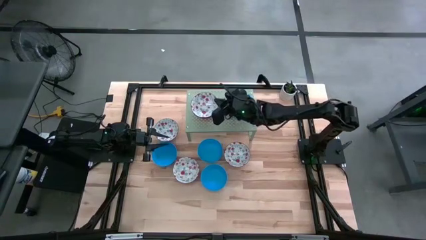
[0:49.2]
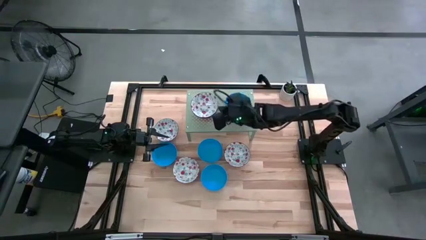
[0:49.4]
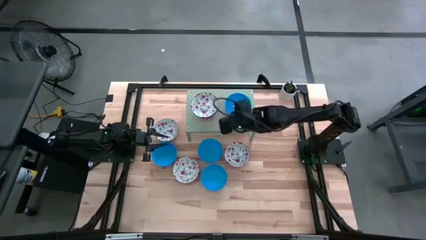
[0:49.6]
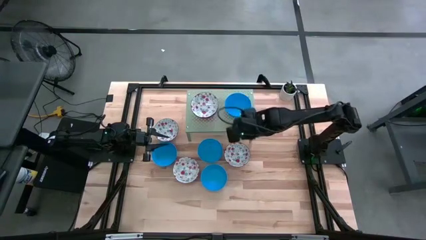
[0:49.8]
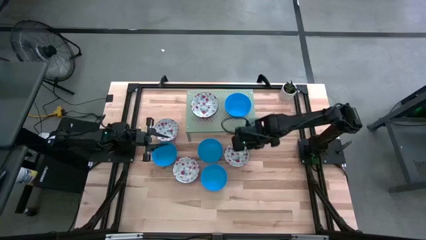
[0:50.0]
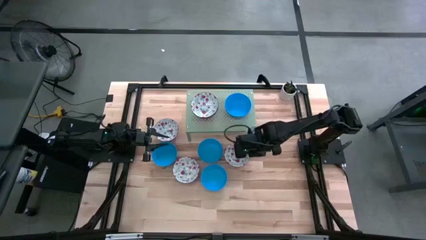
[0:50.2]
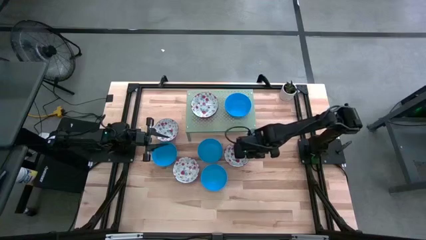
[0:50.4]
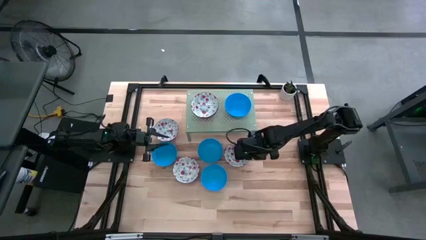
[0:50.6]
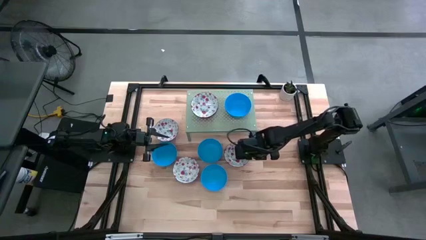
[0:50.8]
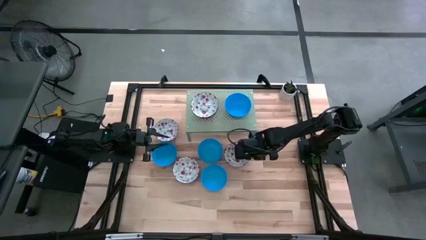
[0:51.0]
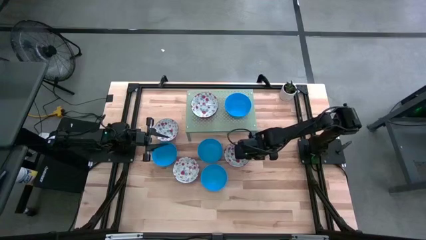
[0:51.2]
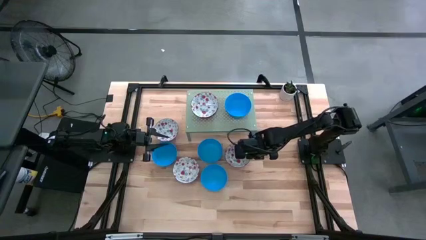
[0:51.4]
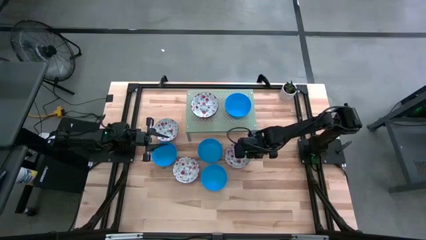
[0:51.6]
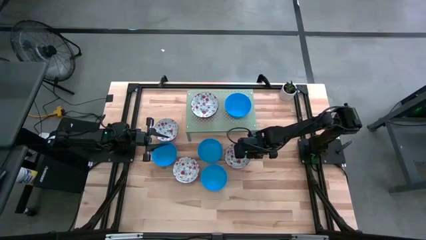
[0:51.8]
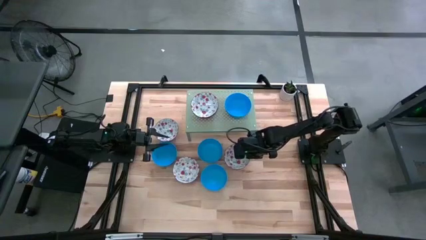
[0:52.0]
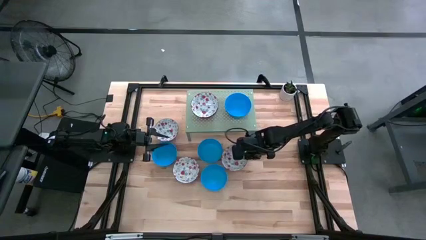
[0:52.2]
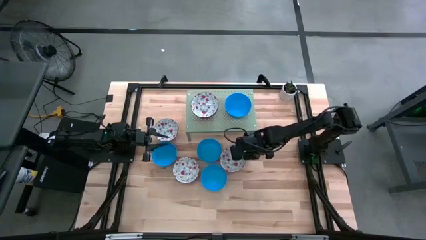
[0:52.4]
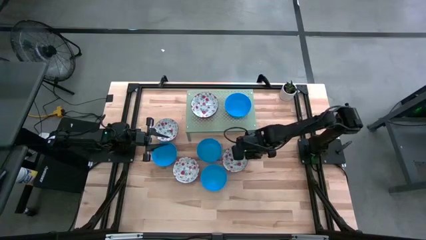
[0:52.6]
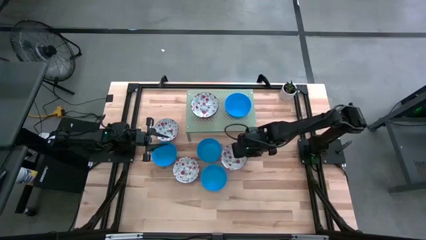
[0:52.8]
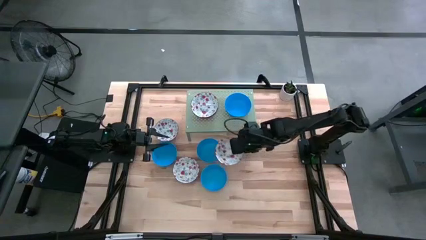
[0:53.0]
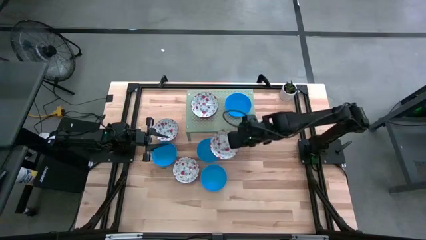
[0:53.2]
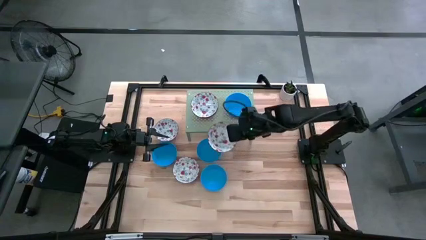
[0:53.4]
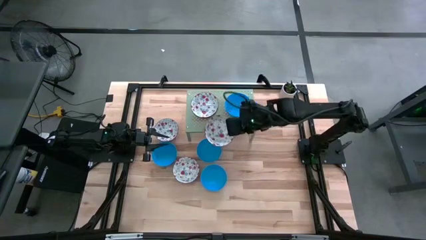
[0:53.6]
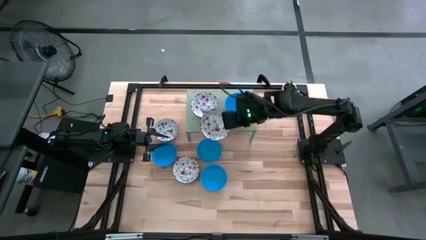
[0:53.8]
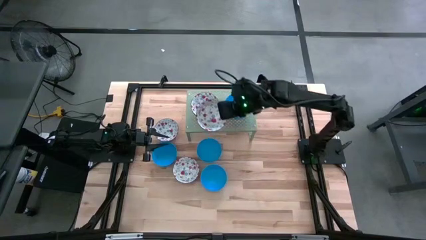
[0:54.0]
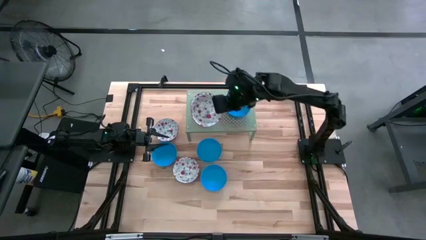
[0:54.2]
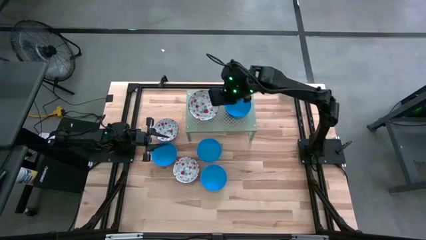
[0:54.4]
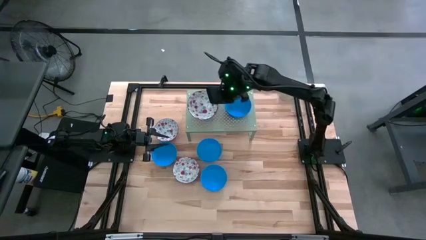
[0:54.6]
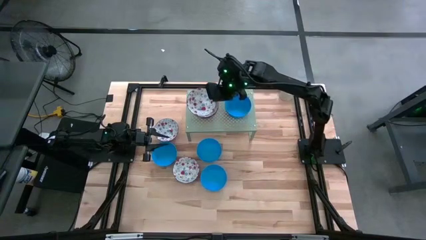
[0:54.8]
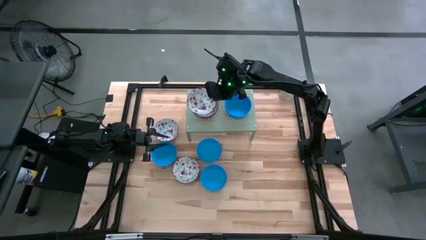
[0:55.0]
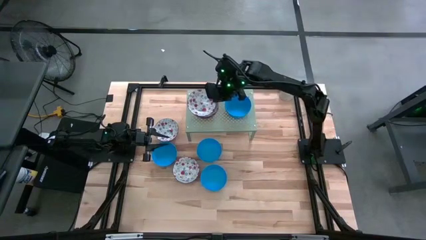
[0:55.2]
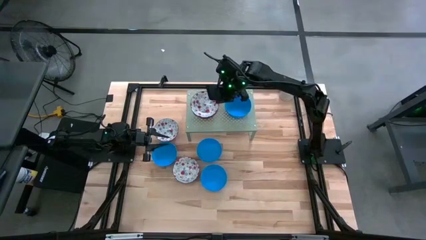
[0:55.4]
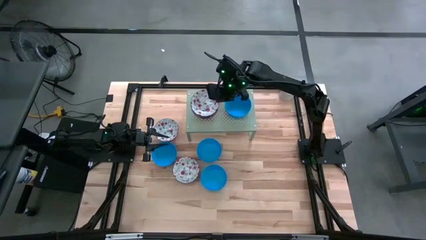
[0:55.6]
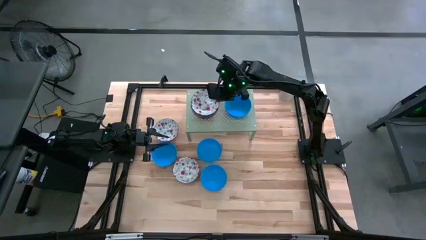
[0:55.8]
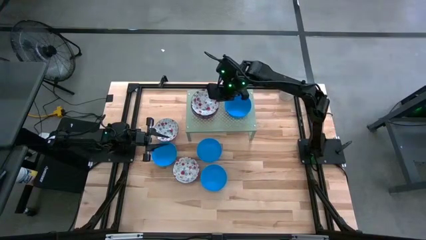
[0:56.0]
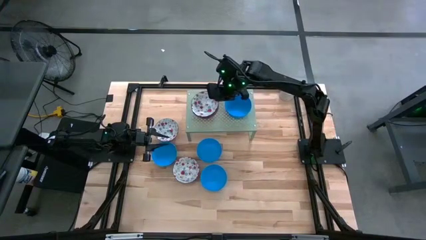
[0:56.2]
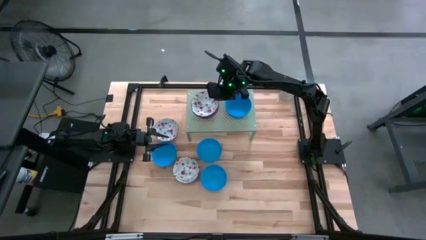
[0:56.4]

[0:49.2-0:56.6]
Task: Pick & Place Mini bowls
Stack the red patterned bowl on the stacked red patterned bowl on the shelf

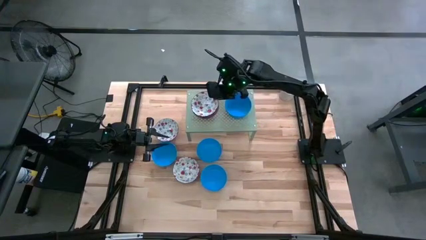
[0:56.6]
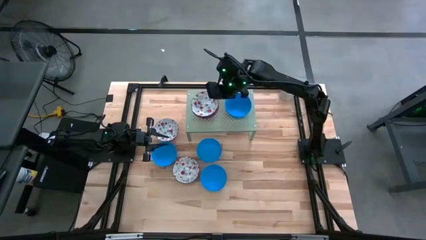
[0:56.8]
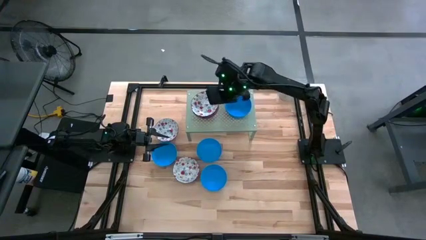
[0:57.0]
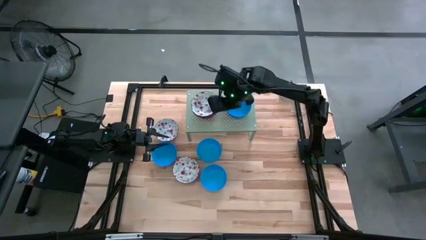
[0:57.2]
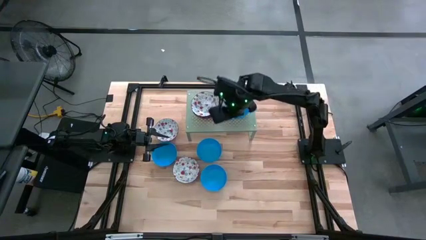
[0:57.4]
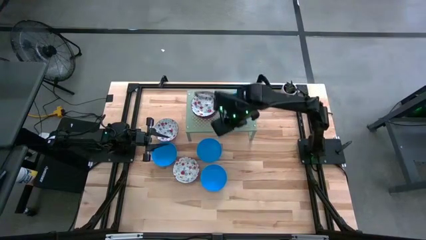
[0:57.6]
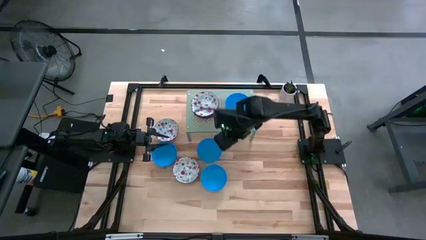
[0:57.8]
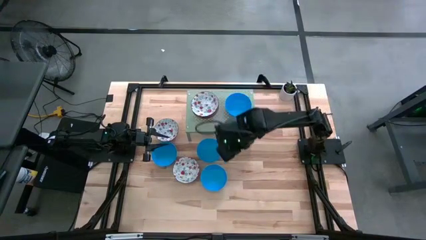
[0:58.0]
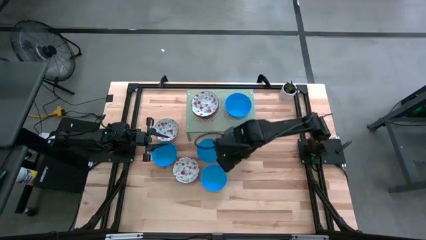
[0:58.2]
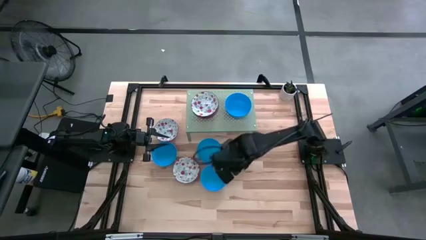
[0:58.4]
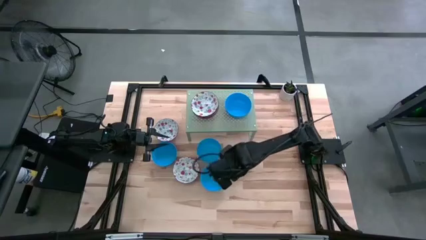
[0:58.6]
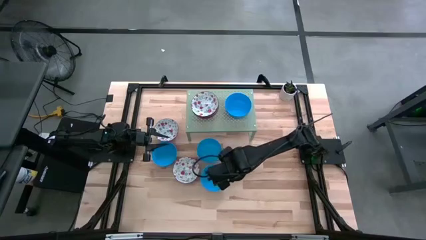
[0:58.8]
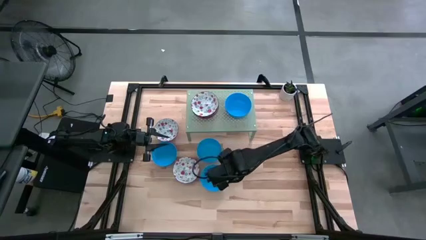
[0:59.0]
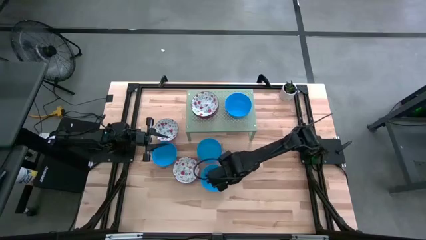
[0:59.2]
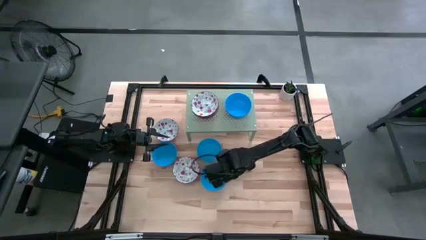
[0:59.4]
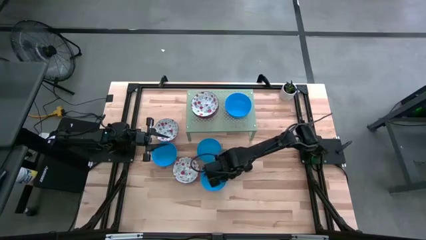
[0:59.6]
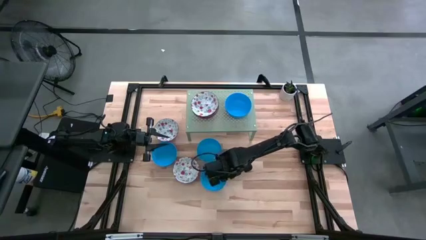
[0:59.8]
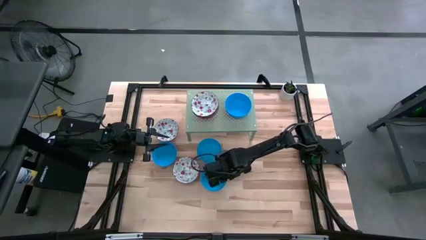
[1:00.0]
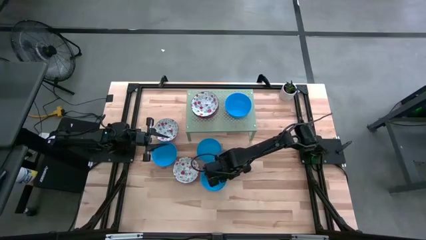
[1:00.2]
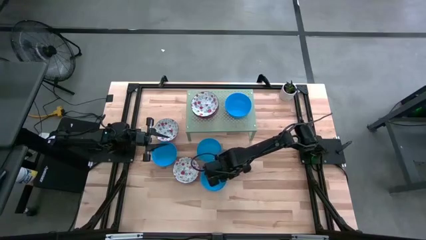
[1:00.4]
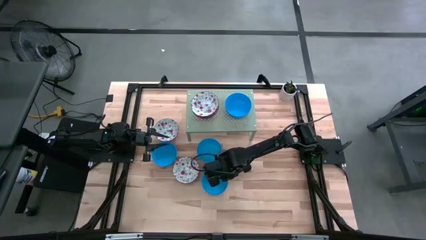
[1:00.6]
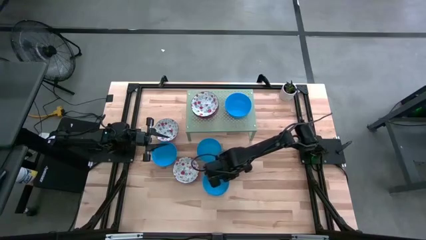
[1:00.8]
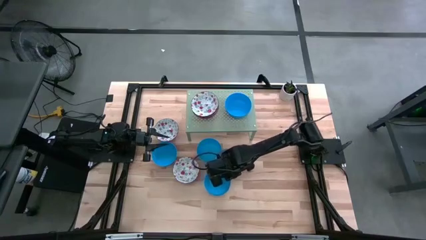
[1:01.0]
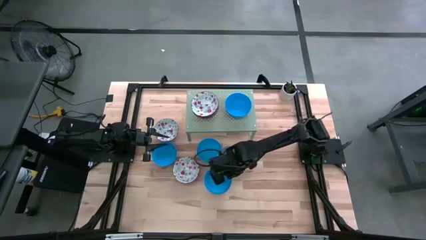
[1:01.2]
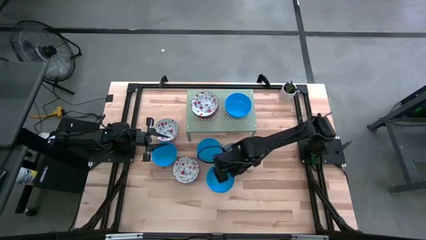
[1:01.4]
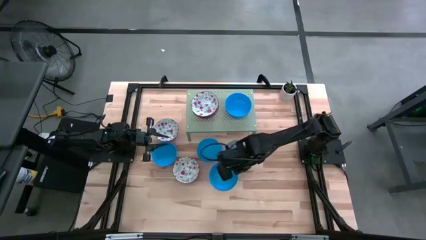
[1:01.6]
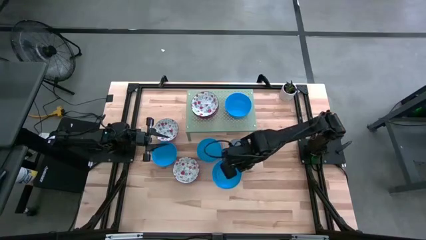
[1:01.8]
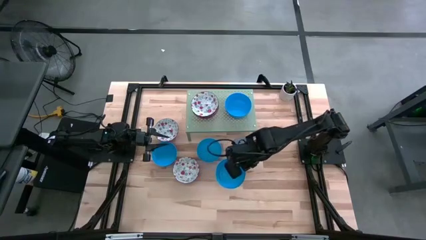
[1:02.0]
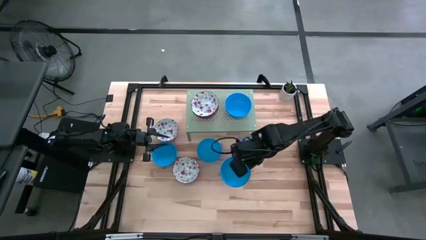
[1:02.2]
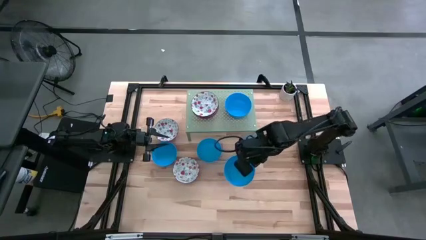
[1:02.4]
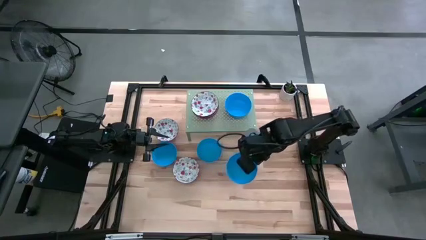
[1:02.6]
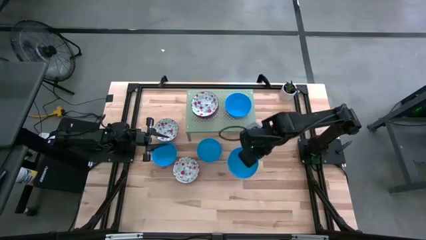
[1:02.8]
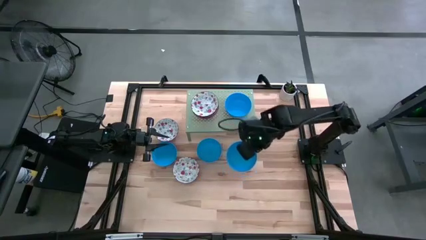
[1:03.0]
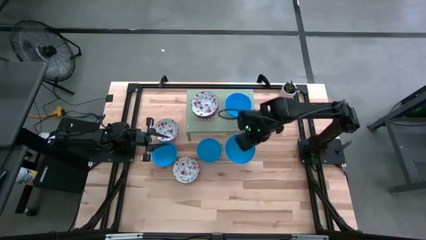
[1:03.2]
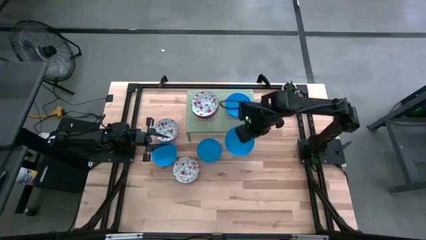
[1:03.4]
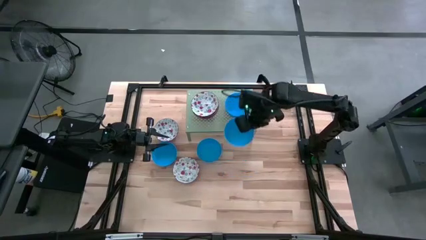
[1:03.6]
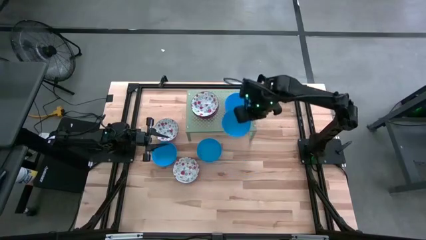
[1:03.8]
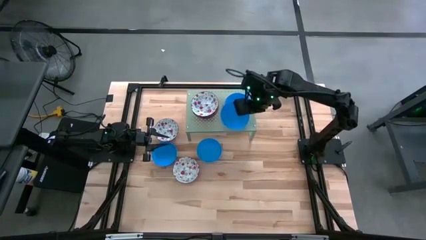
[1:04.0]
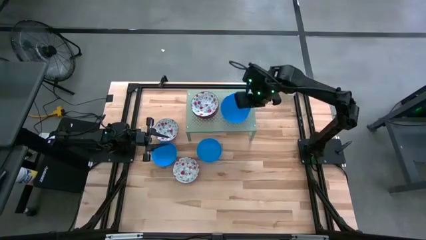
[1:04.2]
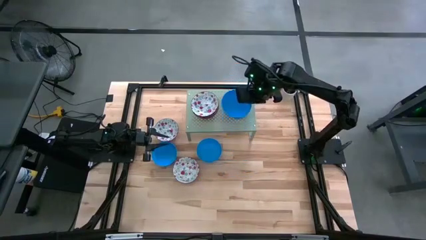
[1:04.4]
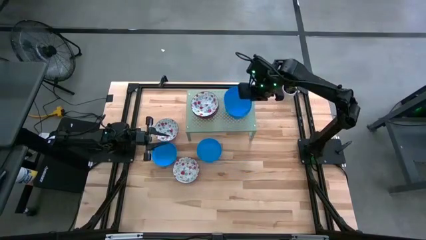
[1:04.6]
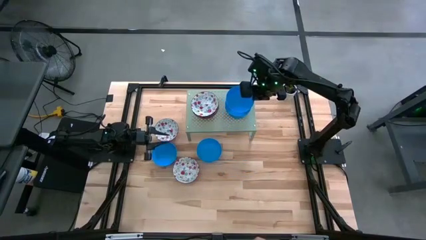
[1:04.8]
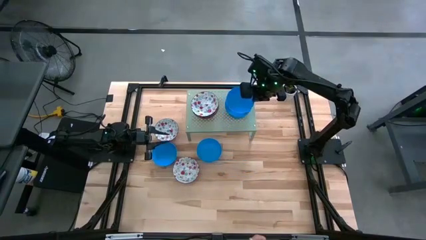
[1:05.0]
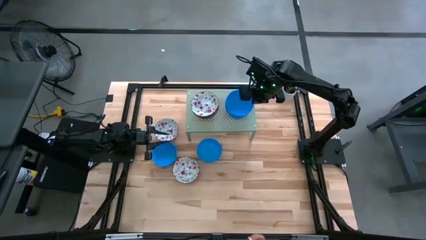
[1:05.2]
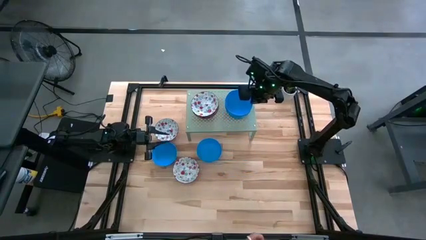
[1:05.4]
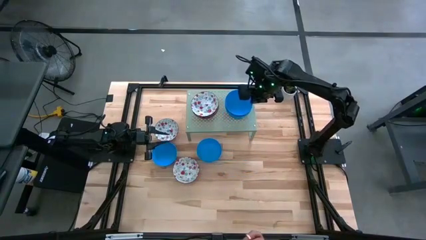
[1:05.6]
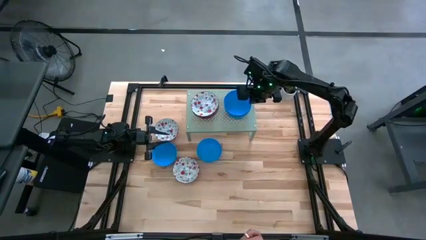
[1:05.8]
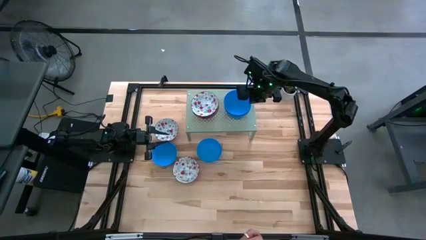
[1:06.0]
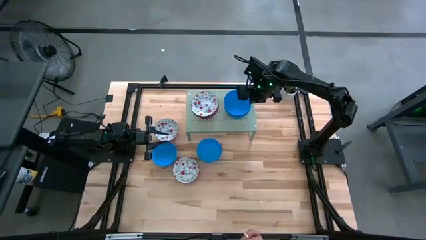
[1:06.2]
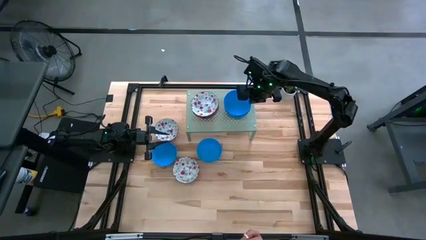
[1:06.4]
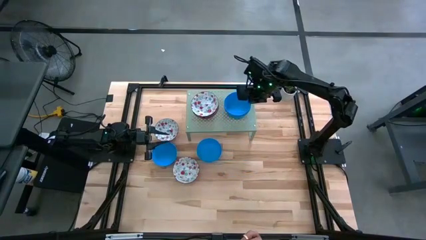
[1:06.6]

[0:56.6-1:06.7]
Stack the light blue bowl on the stacked light blue bowl on the shelf
